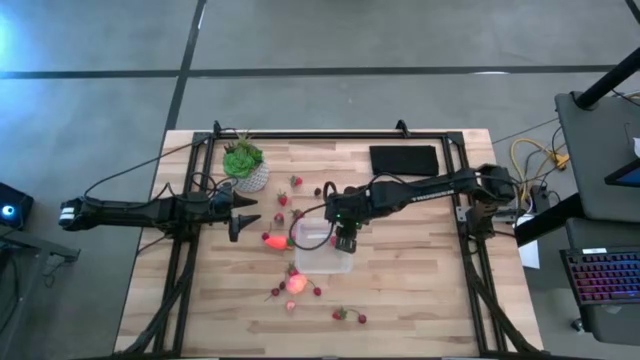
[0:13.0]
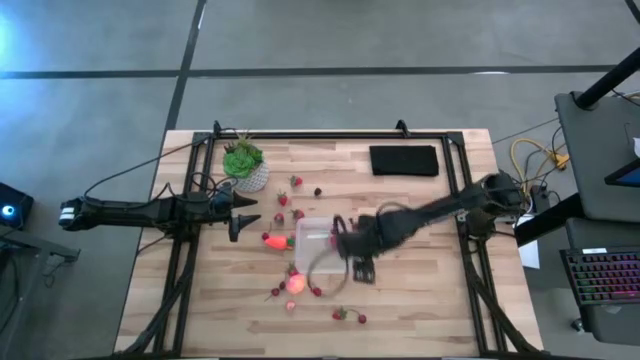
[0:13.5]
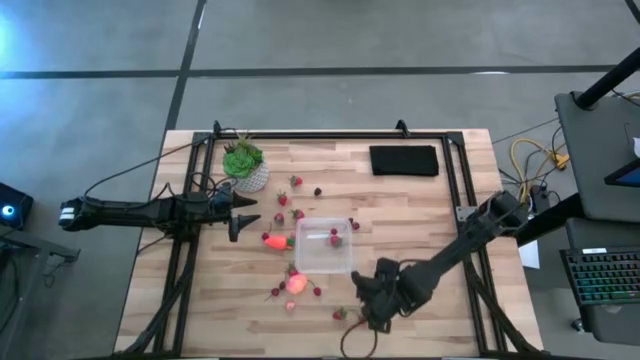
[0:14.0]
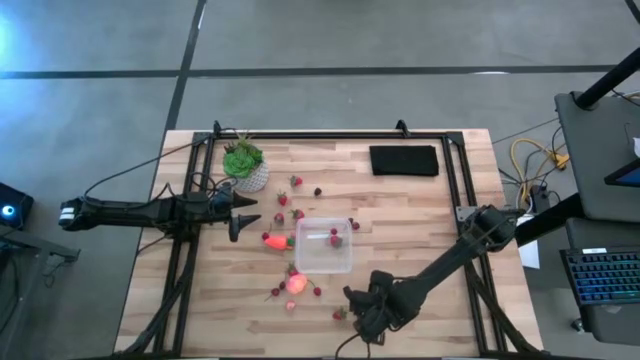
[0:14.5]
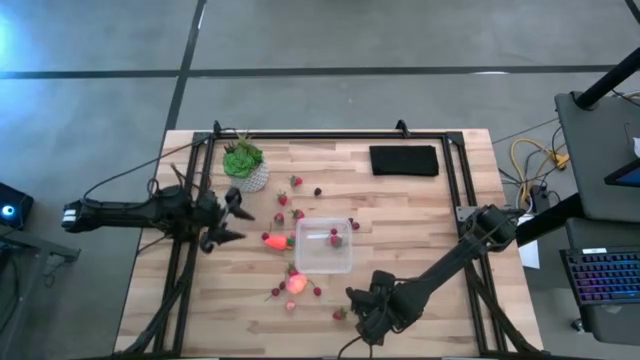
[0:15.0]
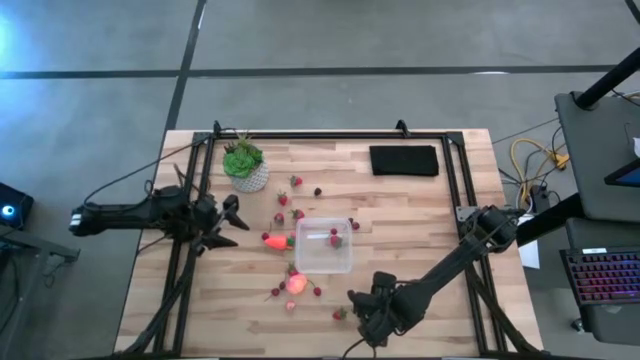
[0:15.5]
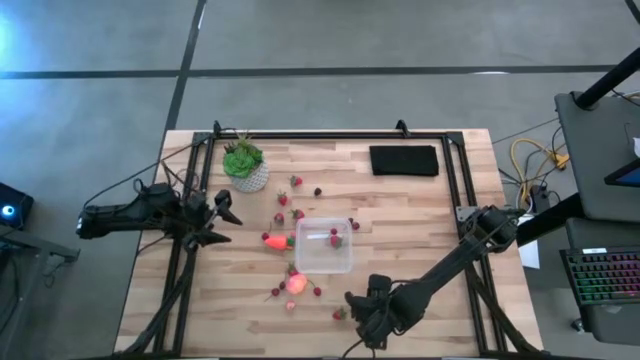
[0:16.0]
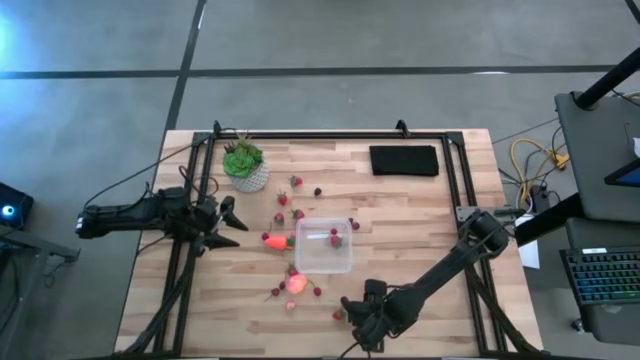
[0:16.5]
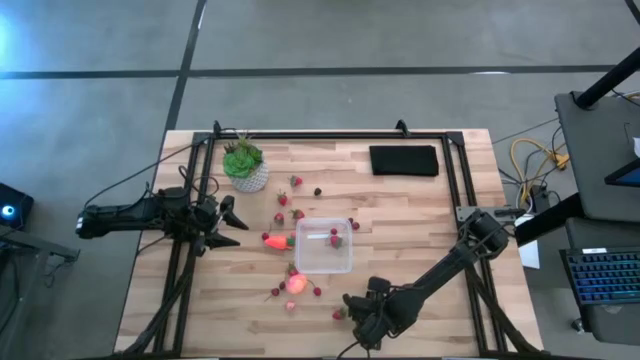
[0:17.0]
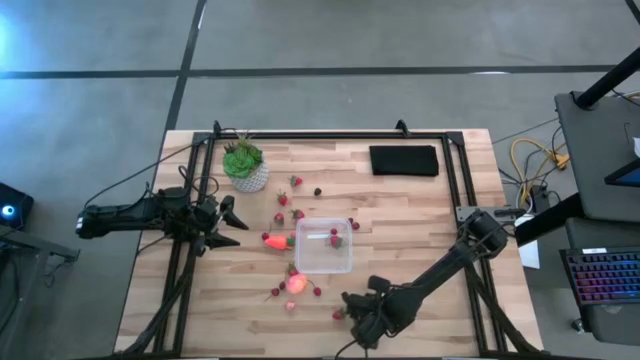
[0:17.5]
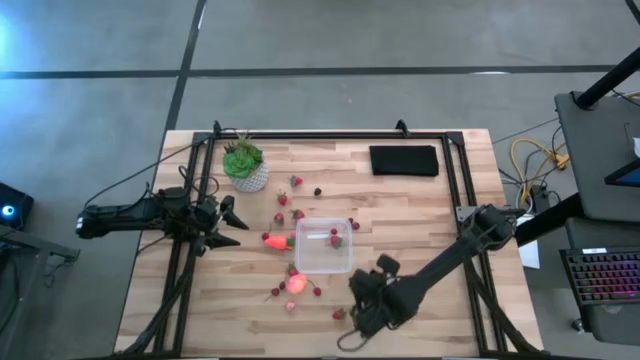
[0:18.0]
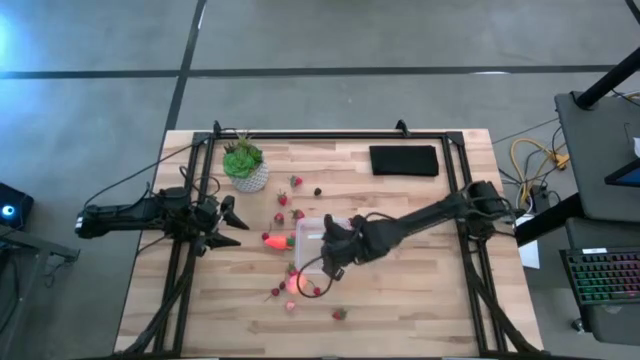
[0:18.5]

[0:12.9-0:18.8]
Task: Pick and placing Produce into tupperware
Put the red cherry into the transparent container

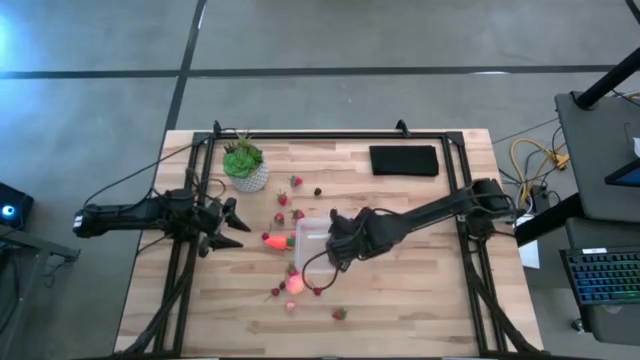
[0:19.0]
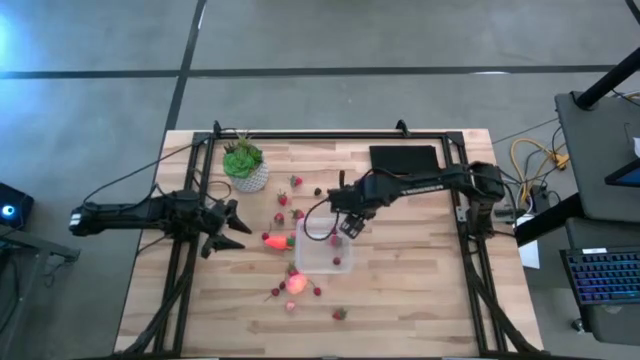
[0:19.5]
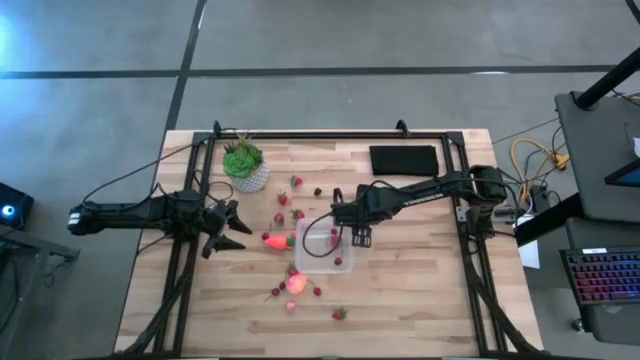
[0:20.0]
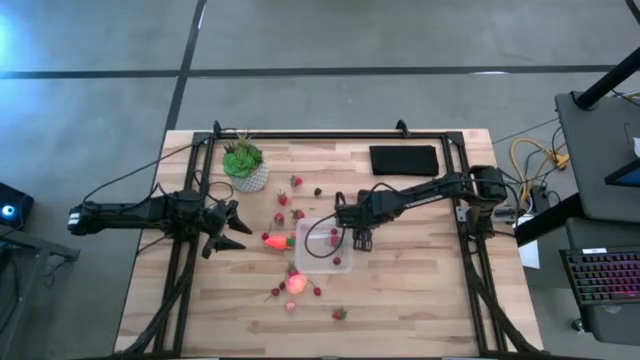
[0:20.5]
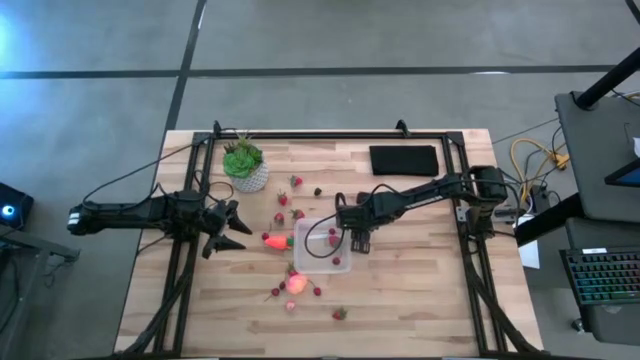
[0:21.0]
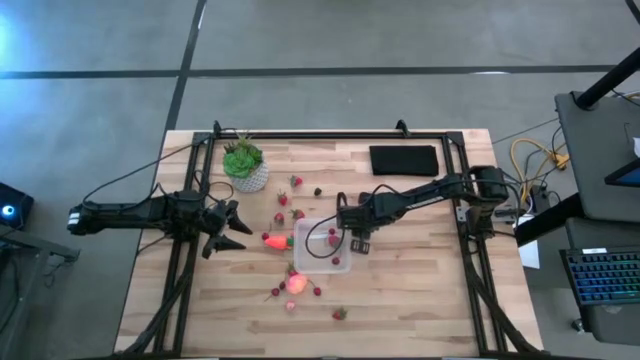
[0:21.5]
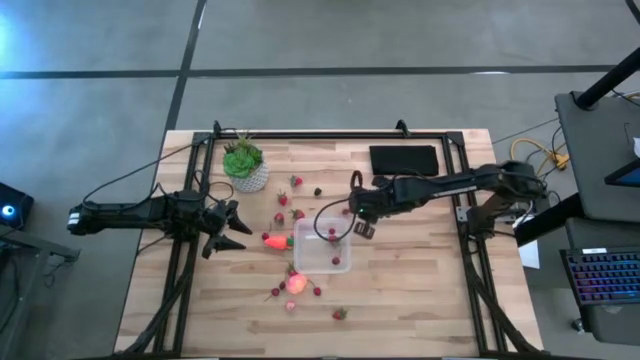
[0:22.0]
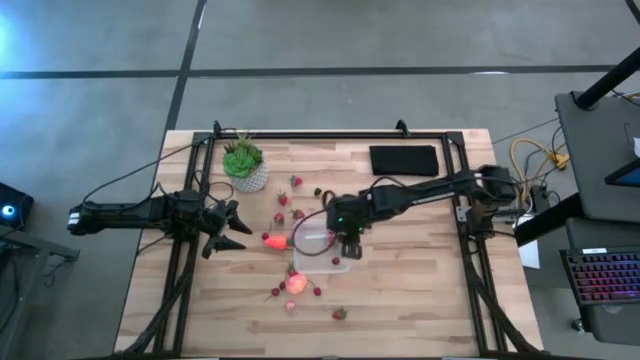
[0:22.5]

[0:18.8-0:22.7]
Put the red cherry into the transparent container

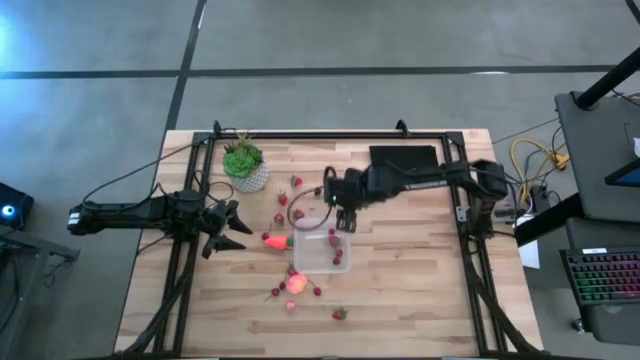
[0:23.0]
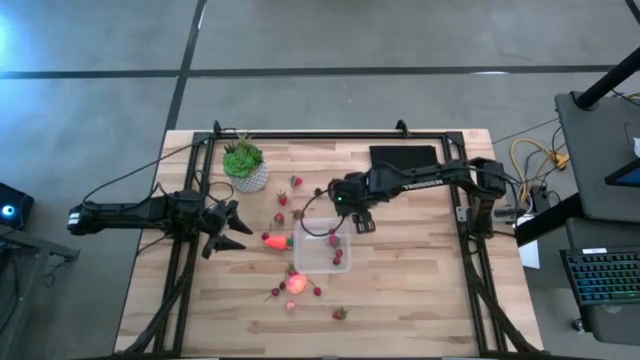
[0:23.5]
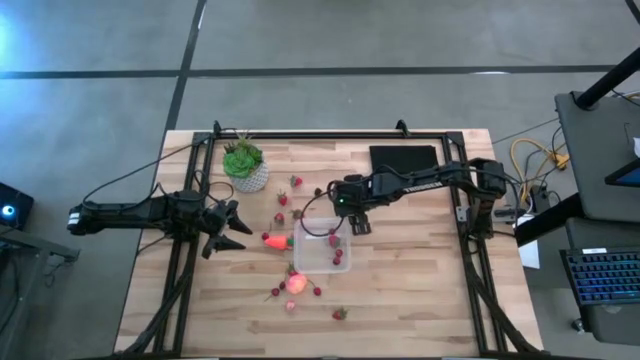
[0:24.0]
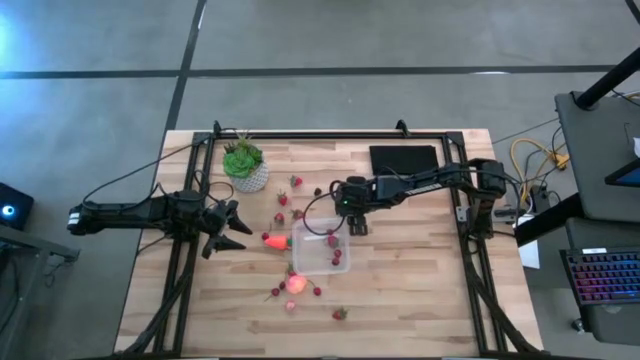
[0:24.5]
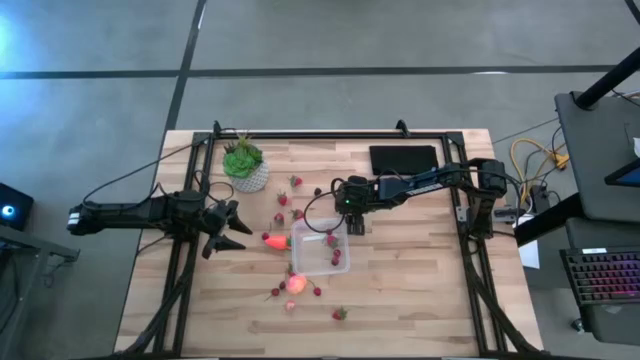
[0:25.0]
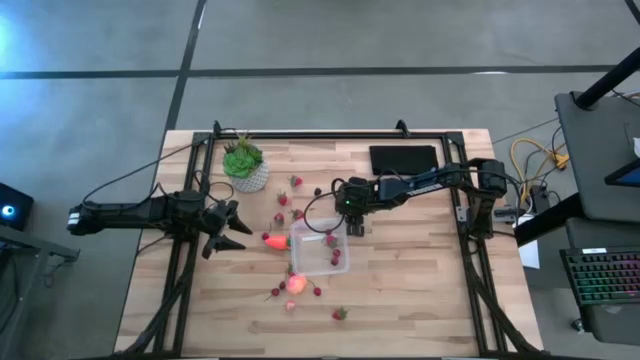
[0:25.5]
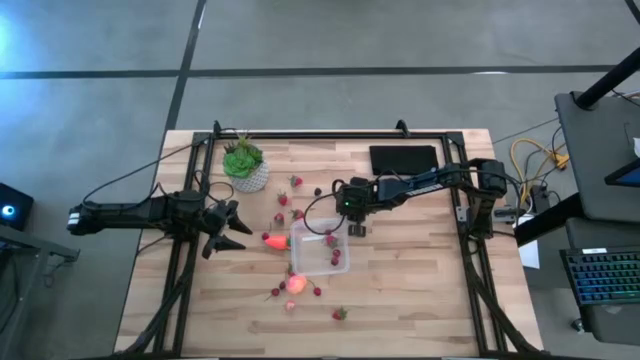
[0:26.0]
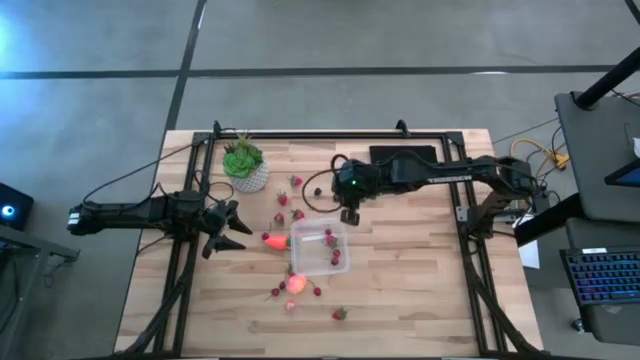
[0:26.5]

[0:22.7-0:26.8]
Put the red cherry into the transparent container

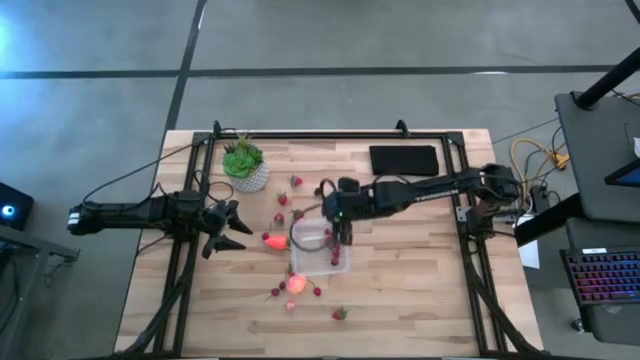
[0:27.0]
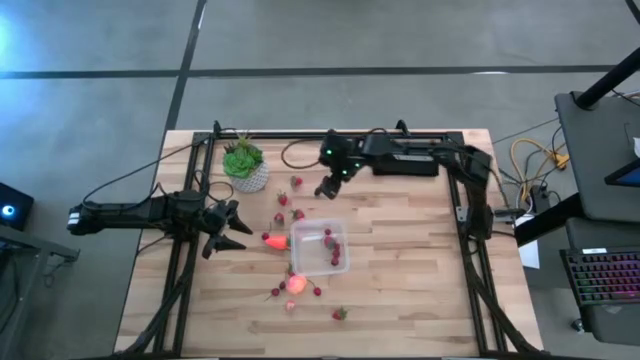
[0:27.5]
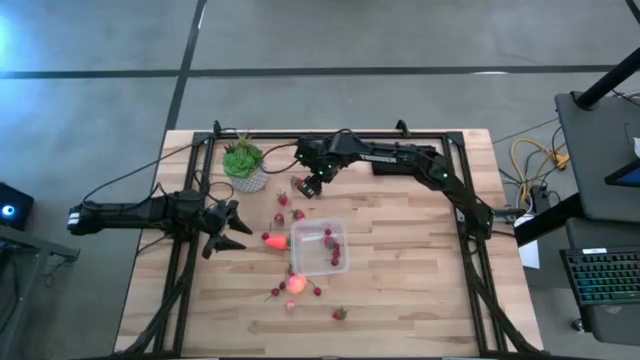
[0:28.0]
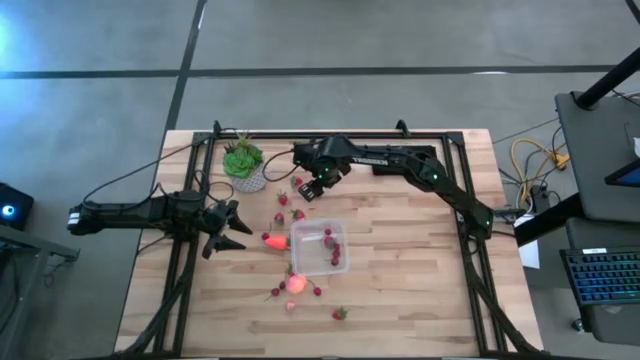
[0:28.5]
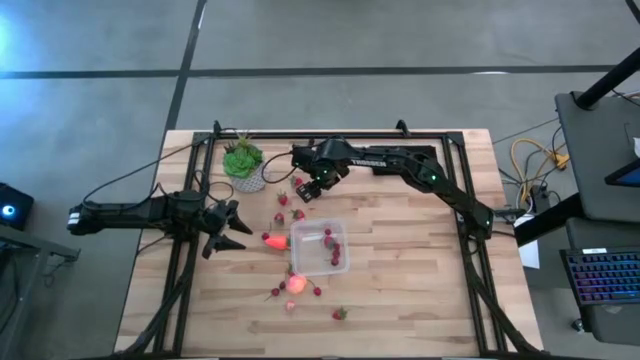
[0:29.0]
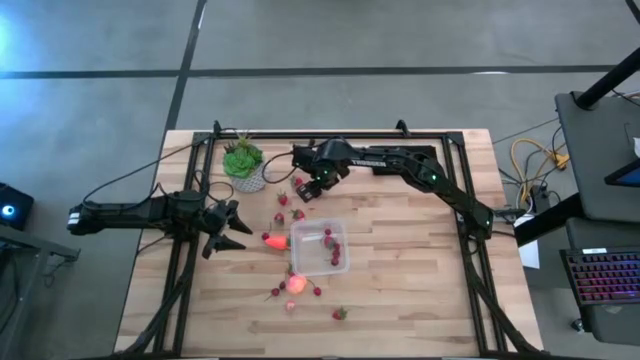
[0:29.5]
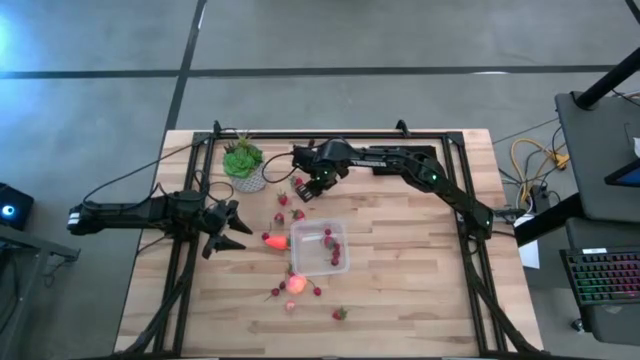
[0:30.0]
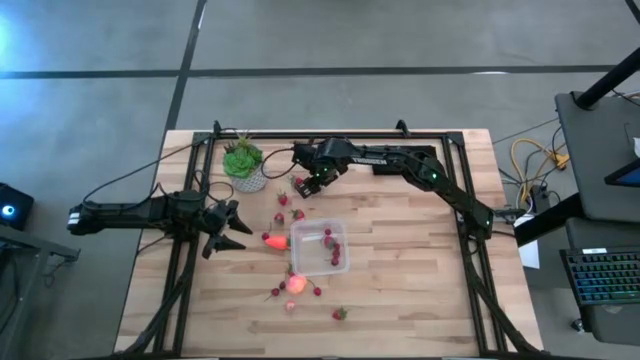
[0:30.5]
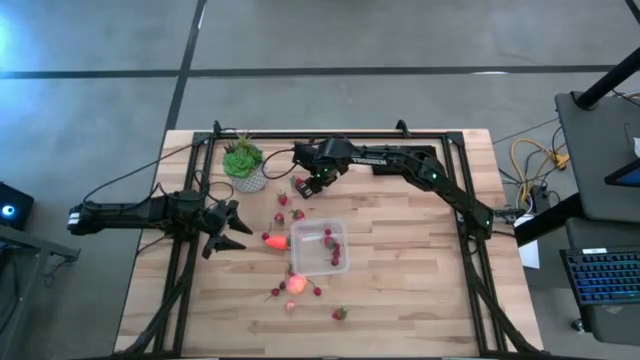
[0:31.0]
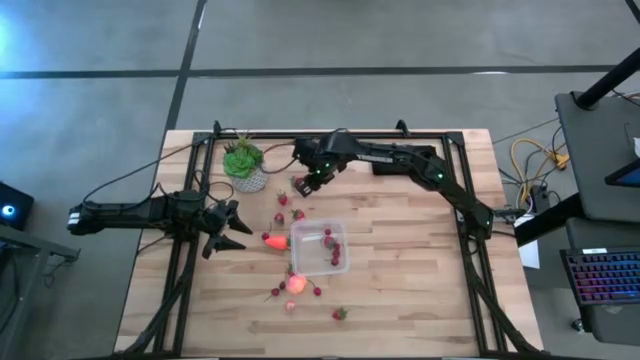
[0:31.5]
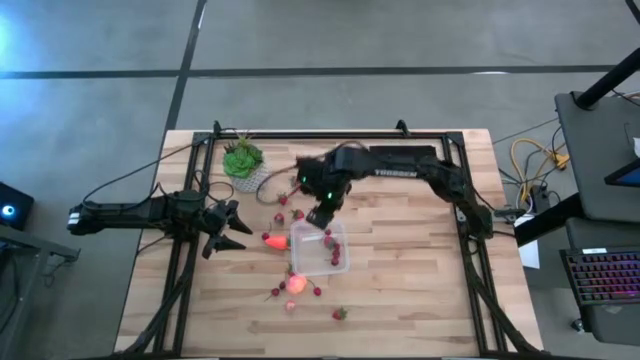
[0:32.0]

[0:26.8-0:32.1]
Put the blackberry into the transparent container

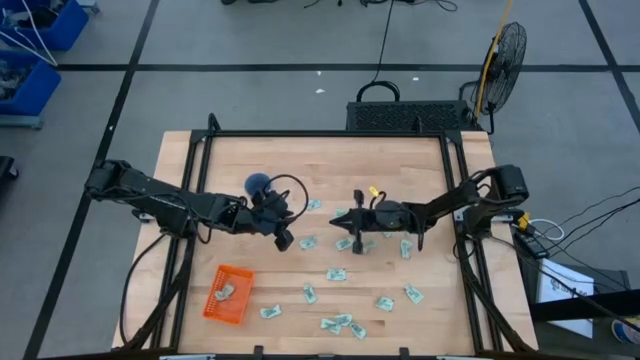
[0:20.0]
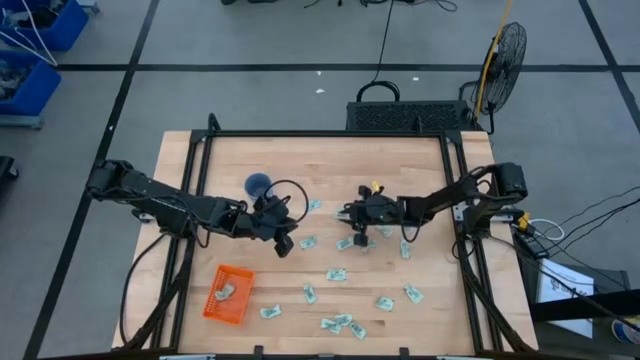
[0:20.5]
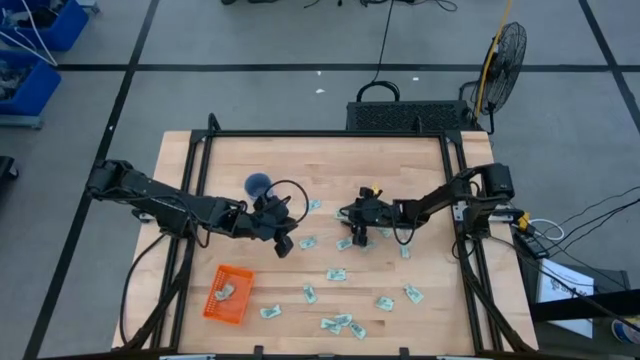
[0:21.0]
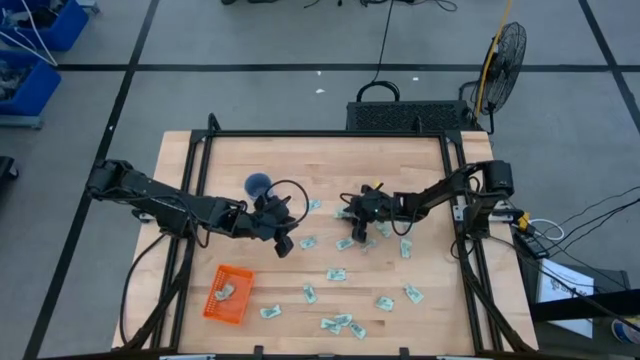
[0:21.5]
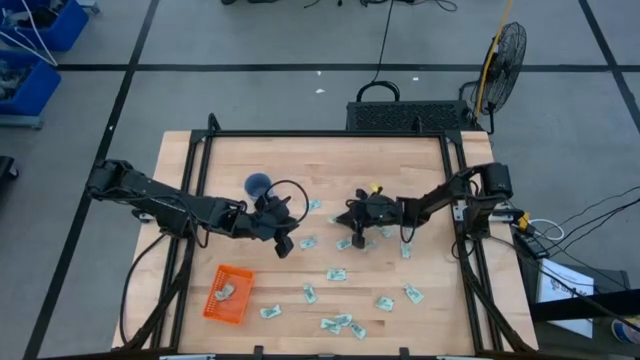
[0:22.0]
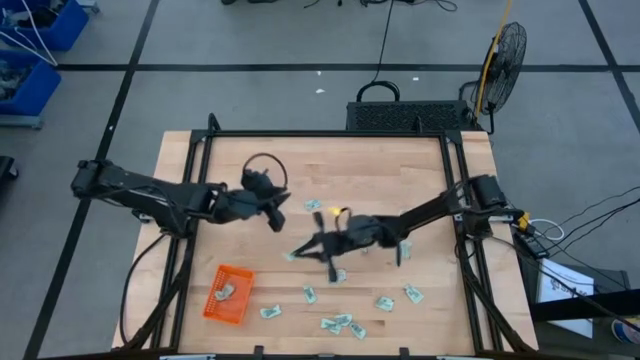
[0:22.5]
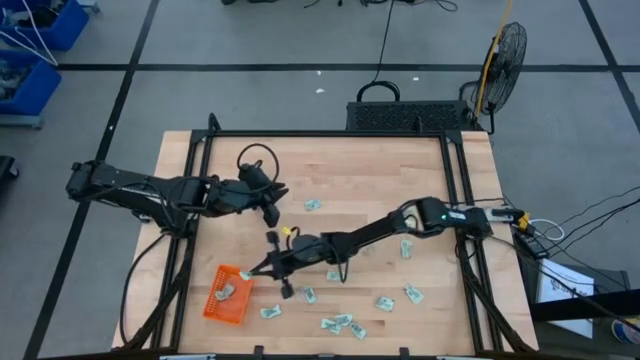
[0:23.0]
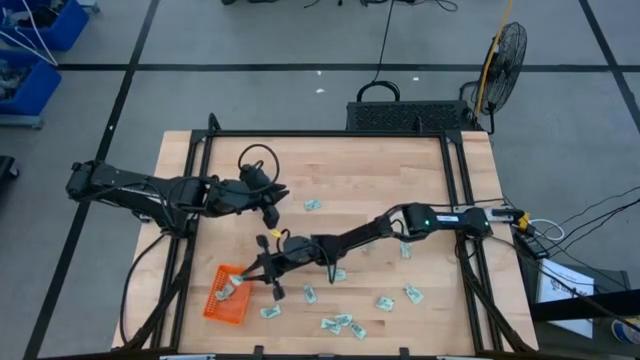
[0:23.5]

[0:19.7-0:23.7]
Task: Pick and place Stevia / Truvia into bins
Put the stevia packet into the orange bin
